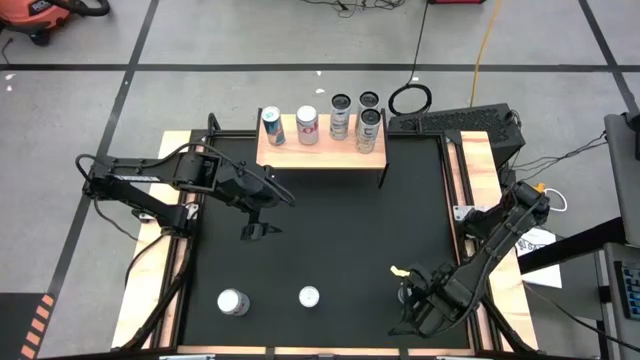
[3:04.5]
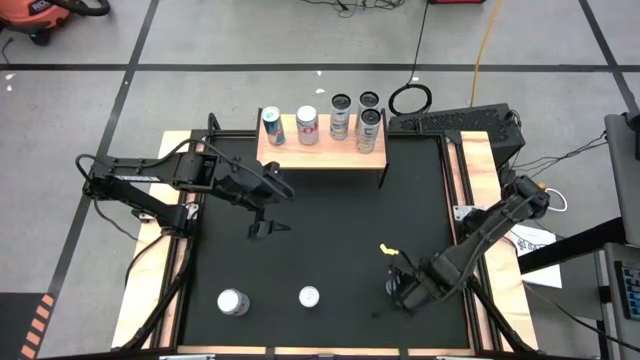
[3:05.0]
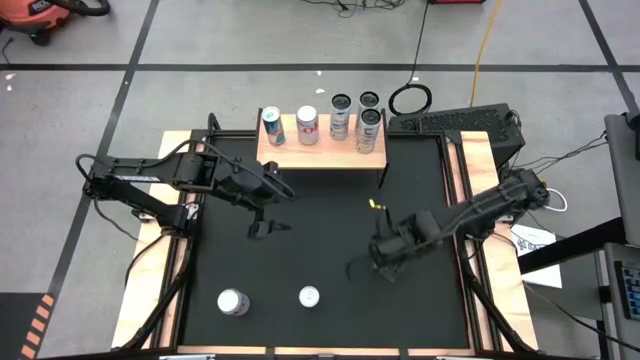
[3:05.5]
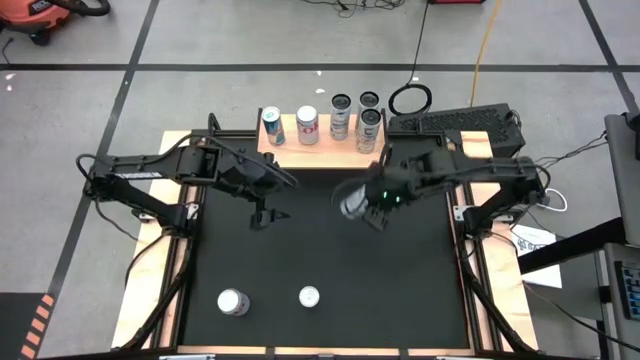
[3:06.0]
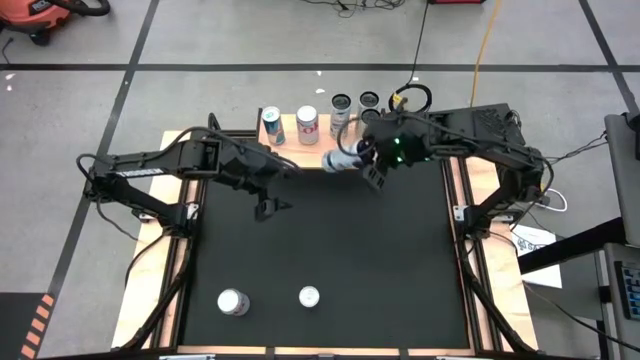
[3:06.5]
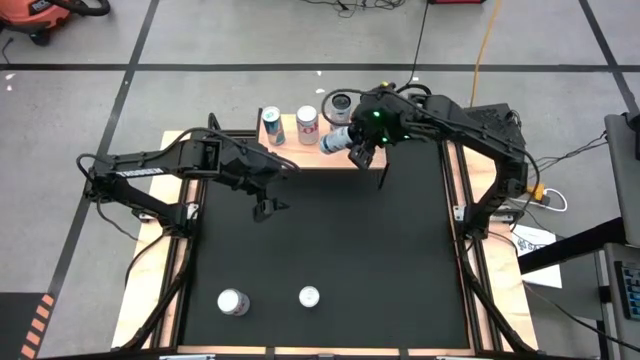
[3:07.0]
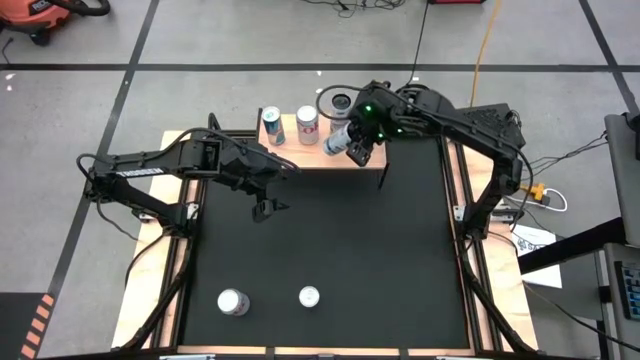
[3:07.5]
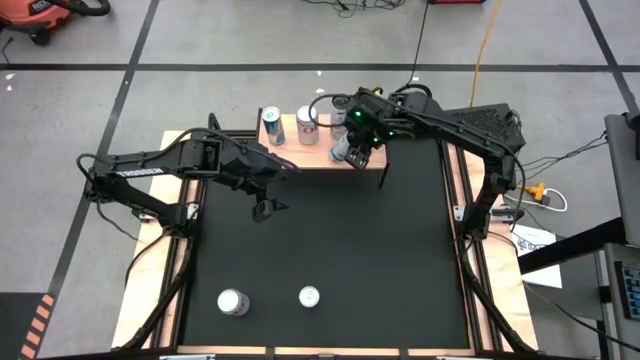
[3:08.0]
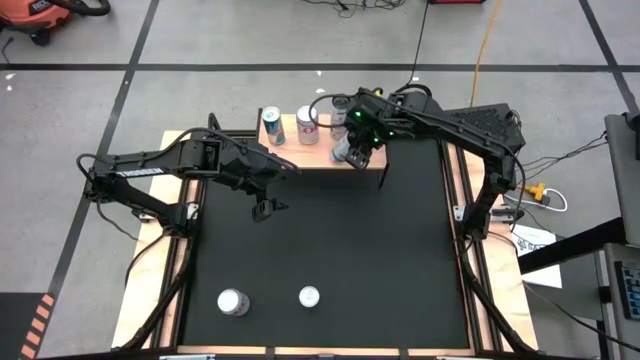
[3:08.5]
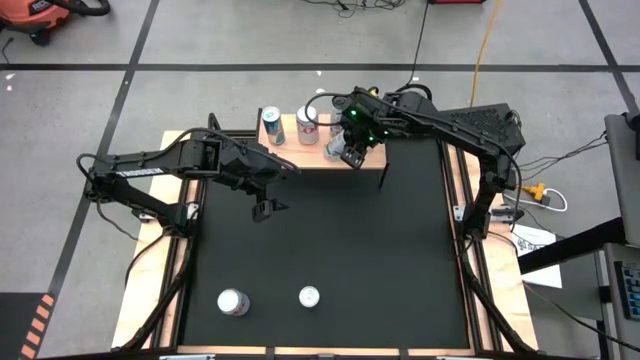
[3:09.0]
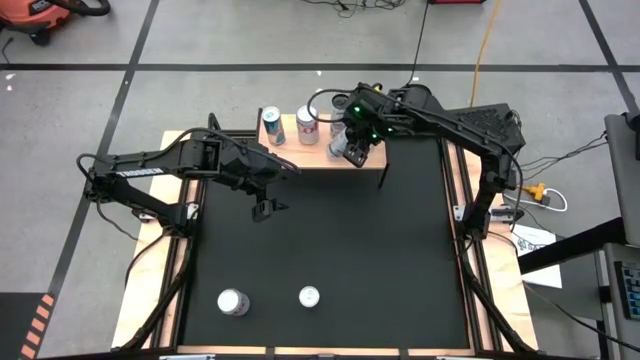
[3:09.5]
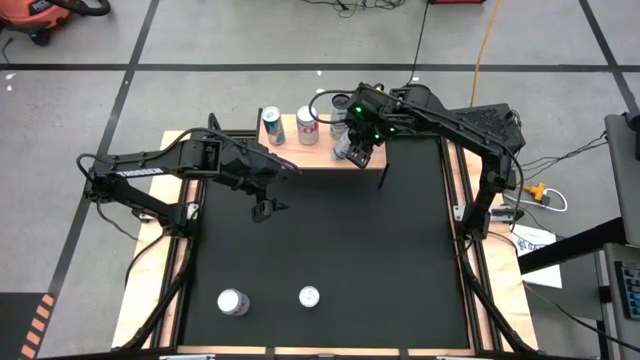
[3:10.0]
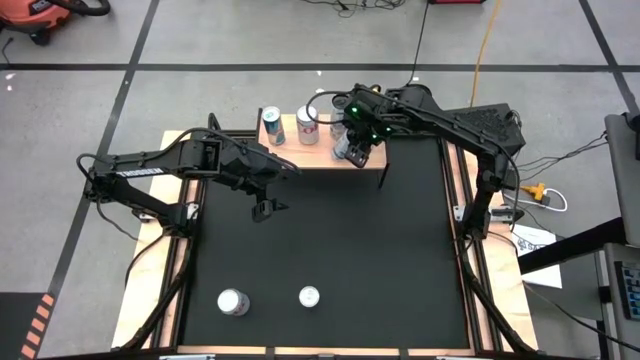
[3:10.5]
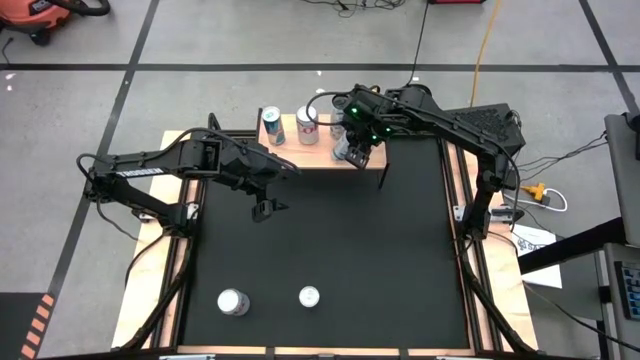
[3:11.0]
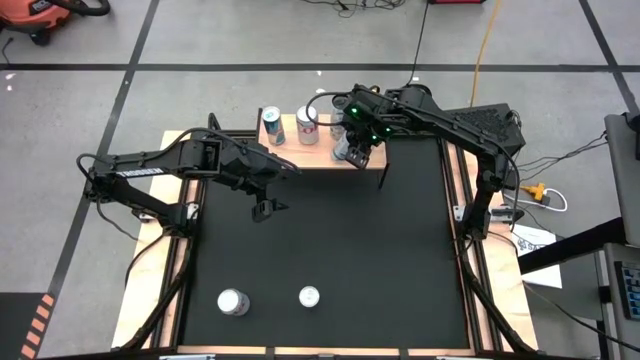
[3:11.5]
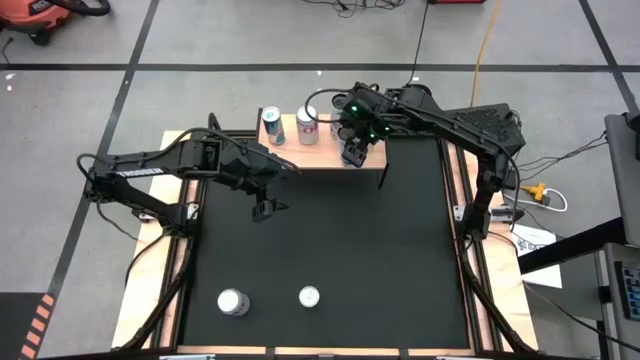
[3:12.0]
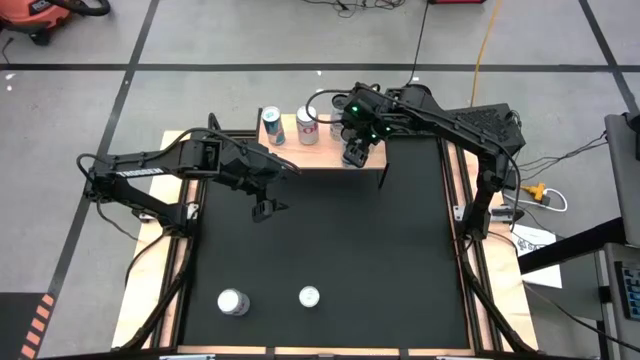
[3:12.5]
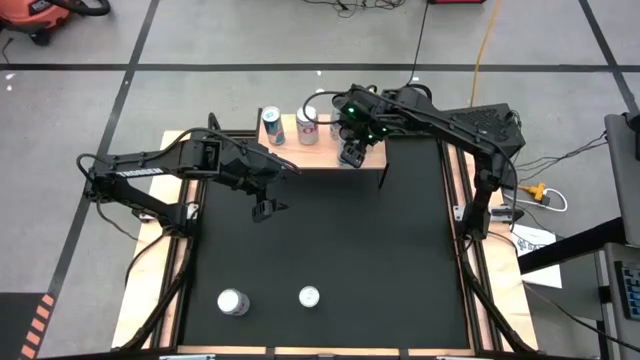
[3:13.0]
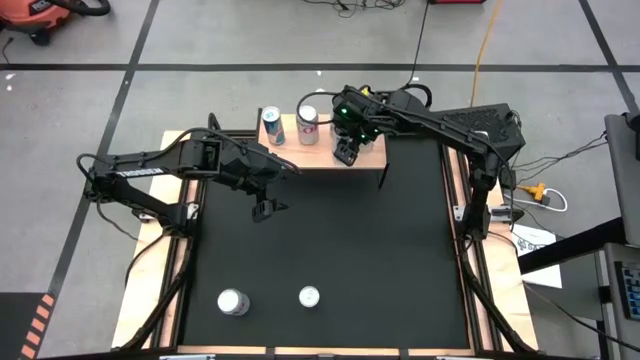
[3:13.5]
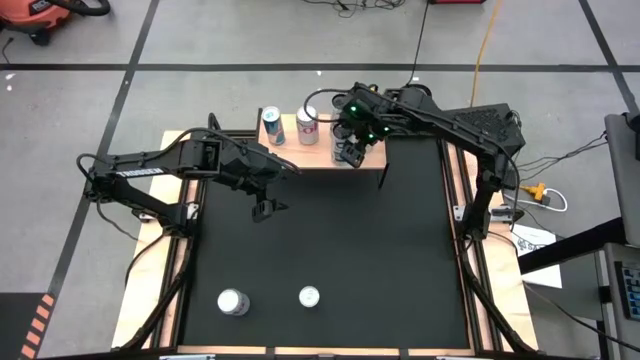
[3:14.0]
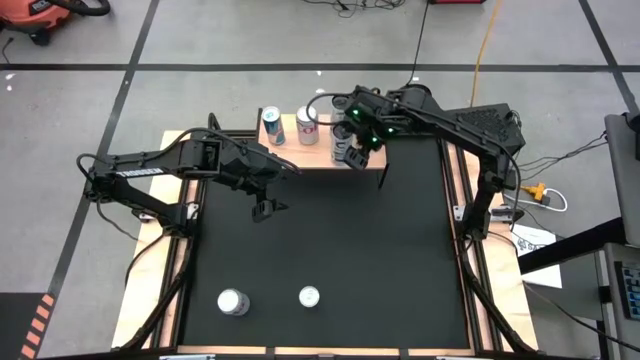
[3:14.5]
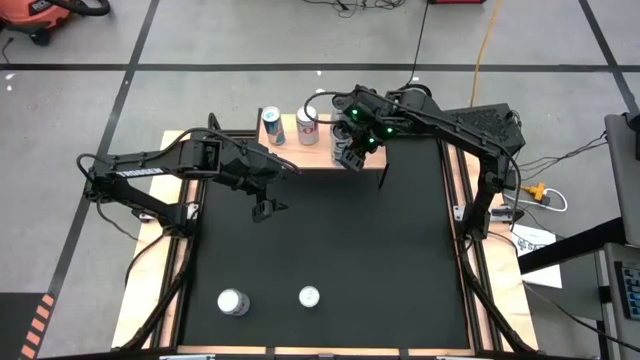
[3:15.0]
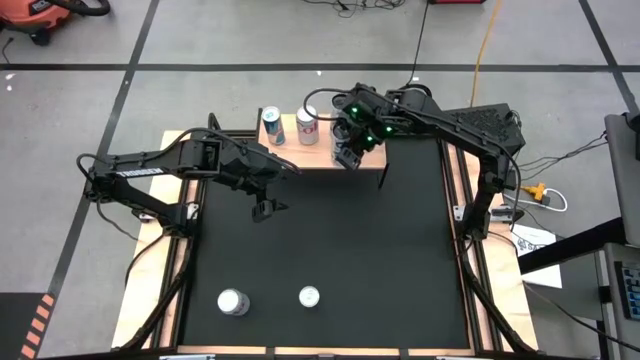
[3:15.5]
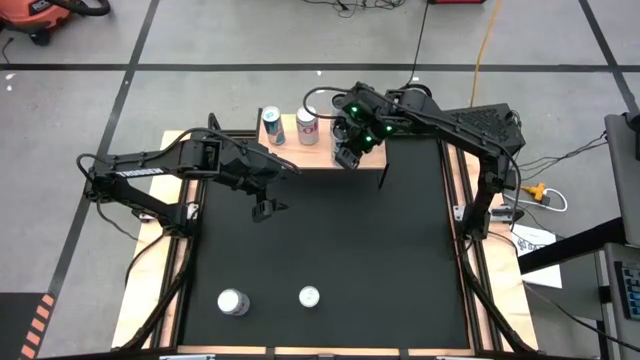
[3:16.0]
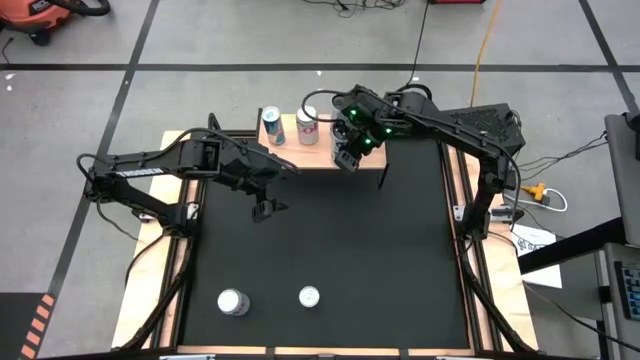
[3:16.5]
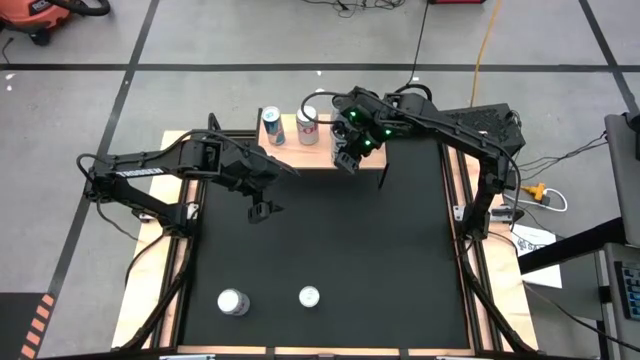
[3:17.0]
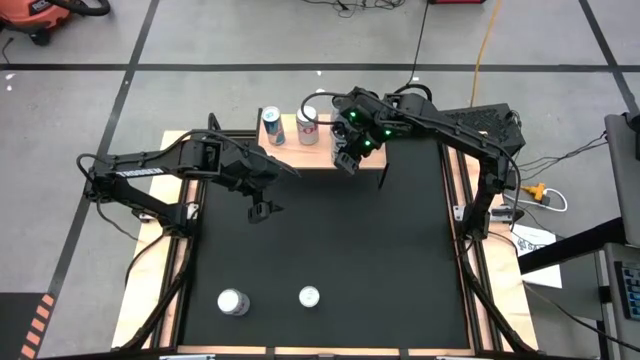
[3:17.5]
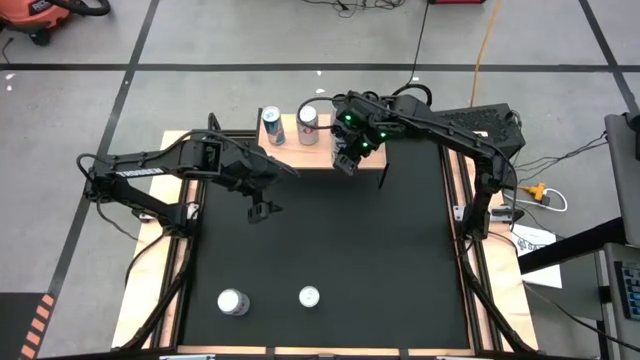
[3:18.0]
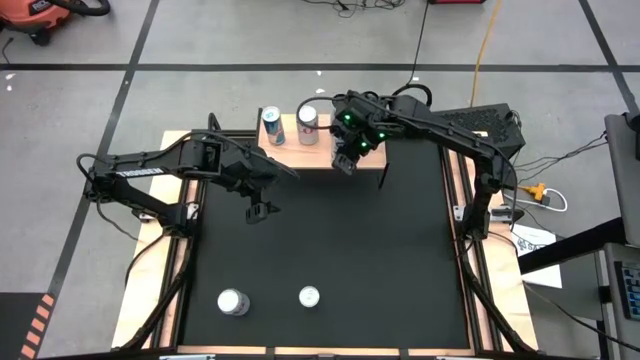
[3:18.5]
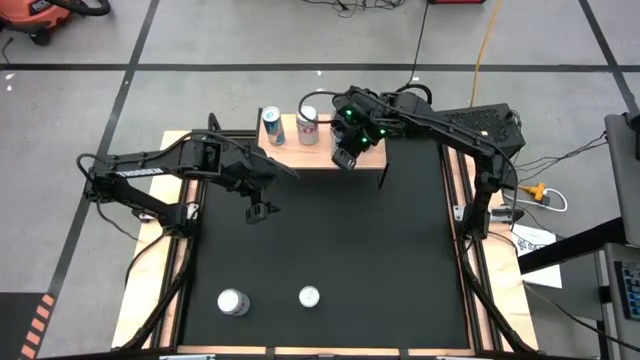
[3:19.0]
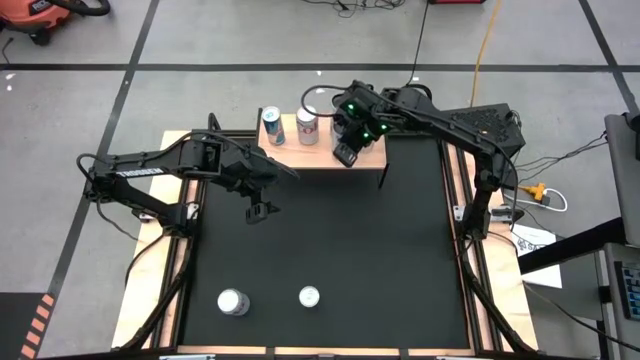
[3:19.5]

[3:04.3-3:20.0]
Task: Place canned beverage on shelf
Put the white blue soda can on the shelf aligned with the other white blue soda can

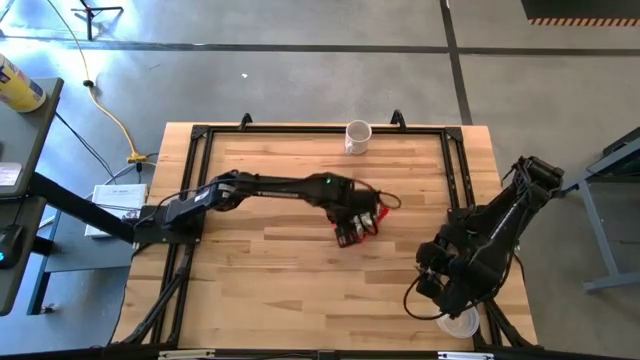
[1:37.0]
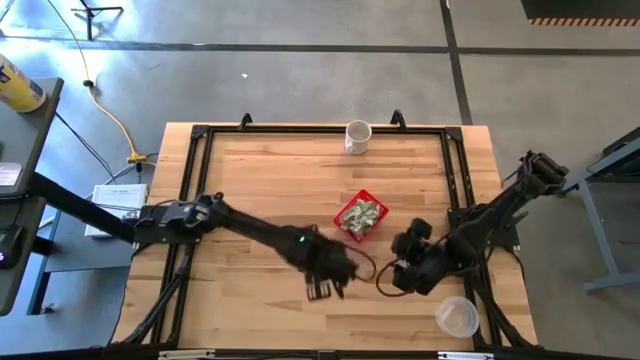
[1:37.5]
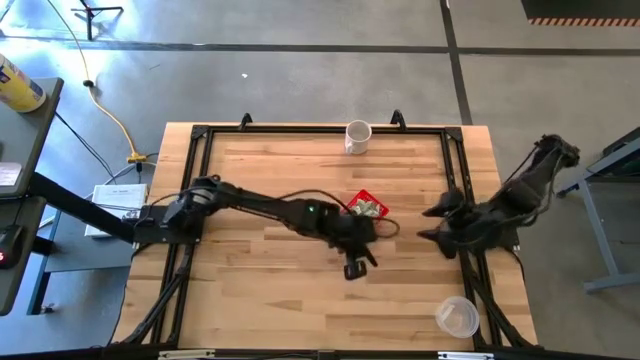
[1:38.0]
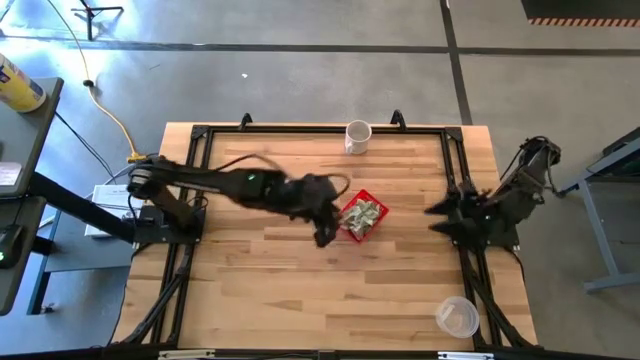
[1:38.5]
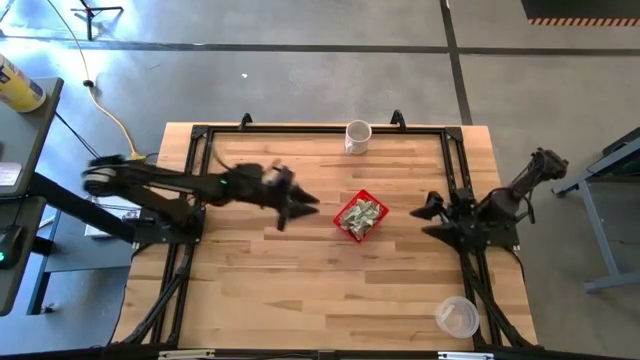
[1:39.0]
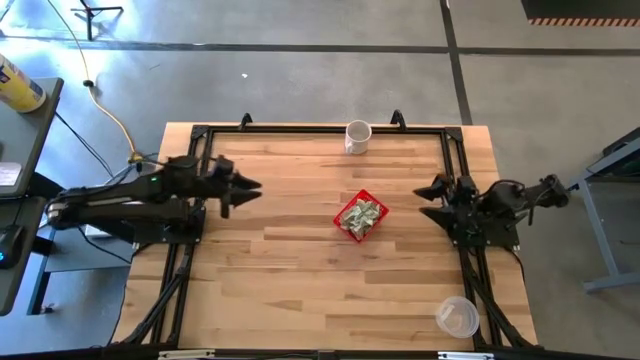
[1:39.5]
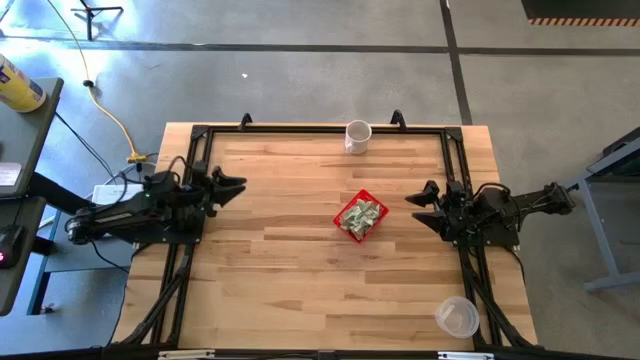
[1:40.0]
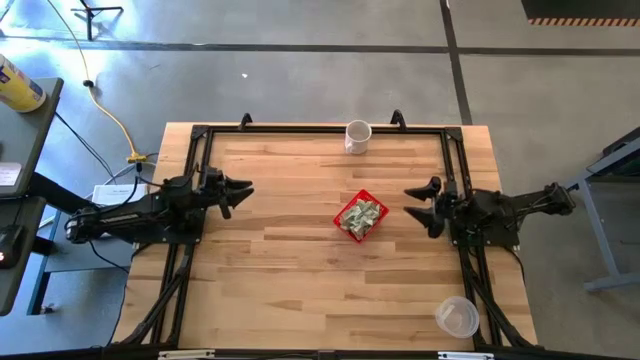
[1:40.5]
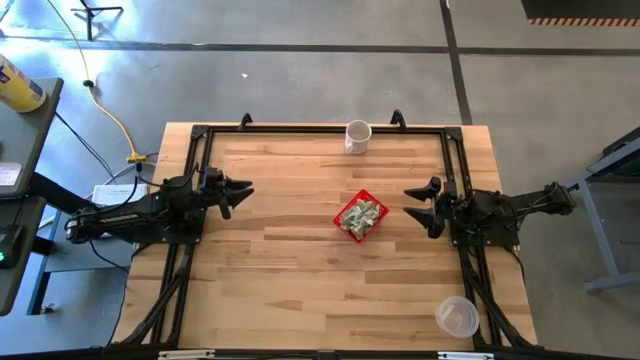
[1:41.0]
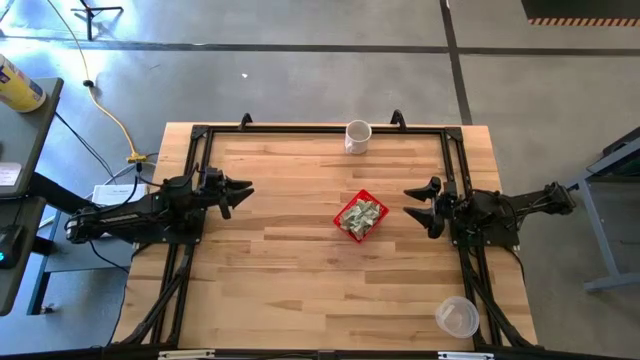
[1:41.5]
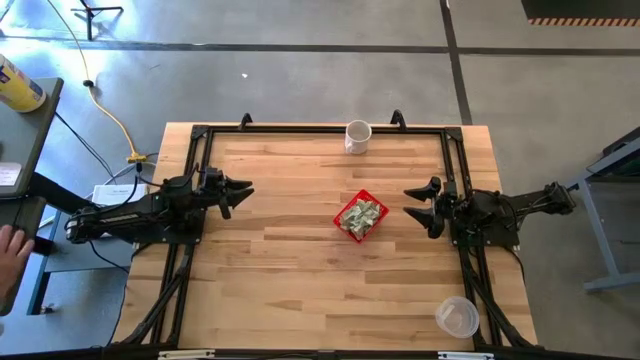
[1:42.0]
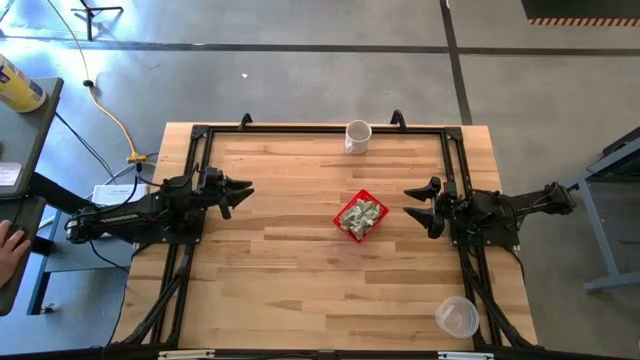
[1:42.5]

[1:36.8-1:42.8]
Task: Pick and place items into bin
Return to Home Position
